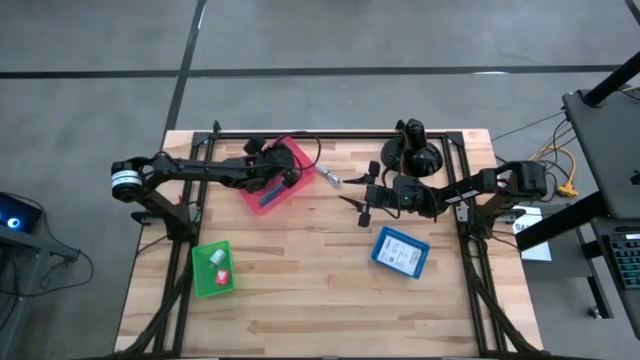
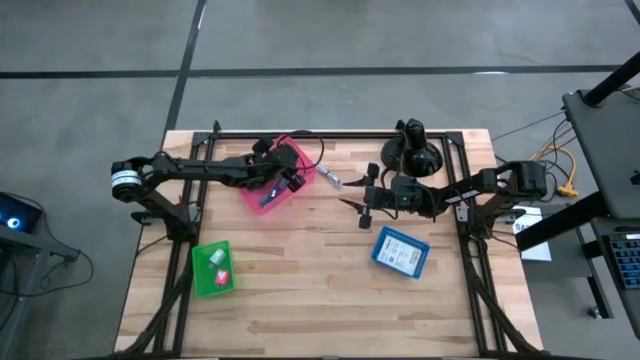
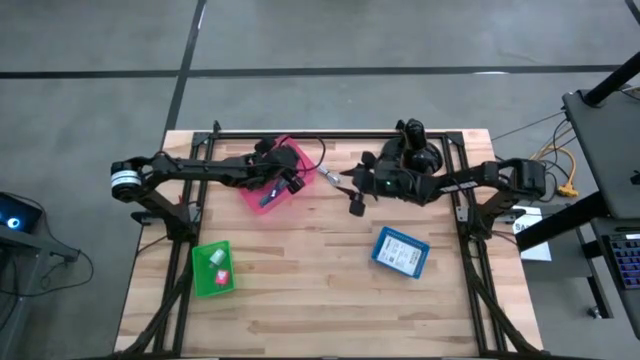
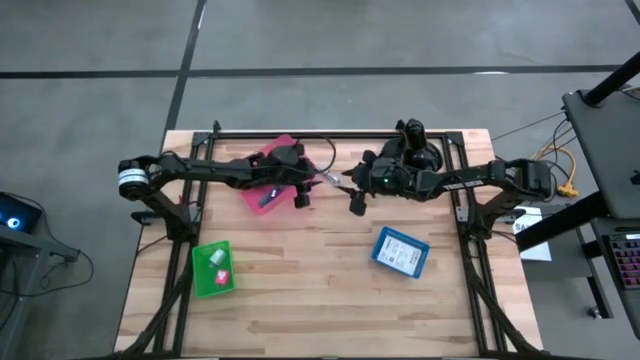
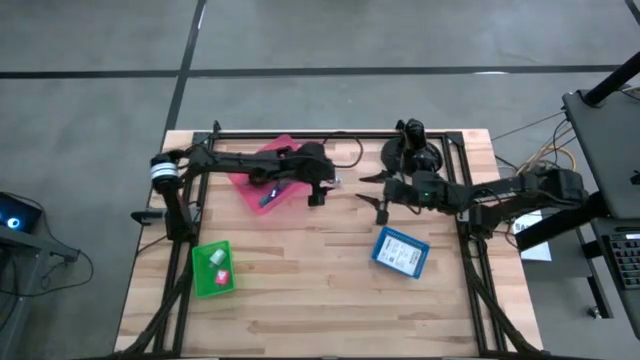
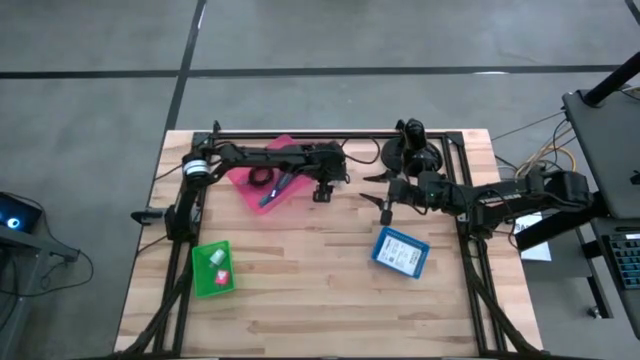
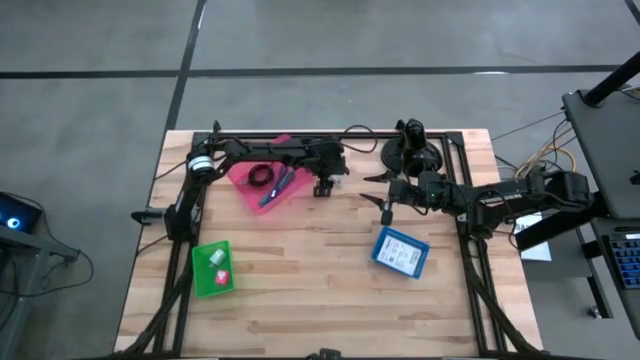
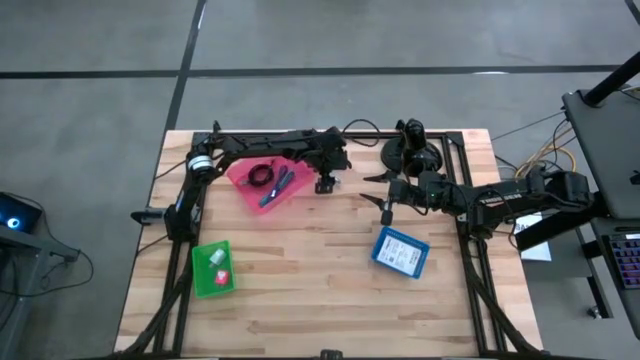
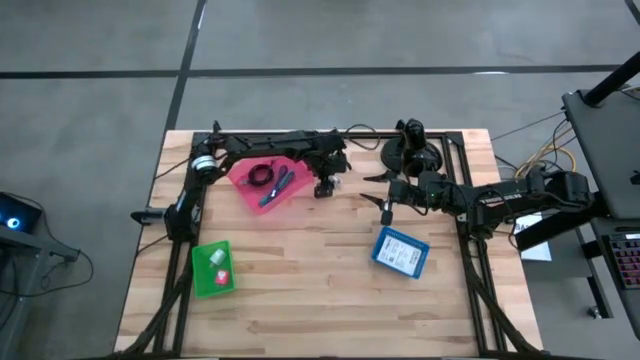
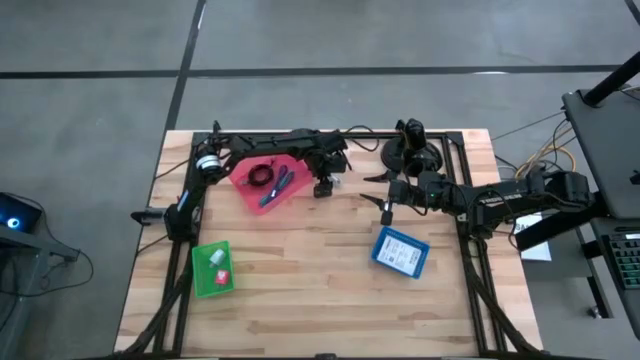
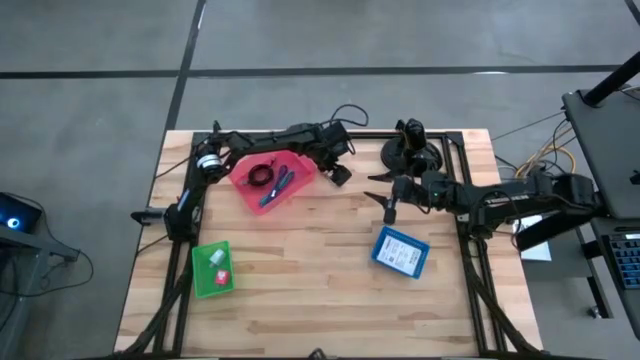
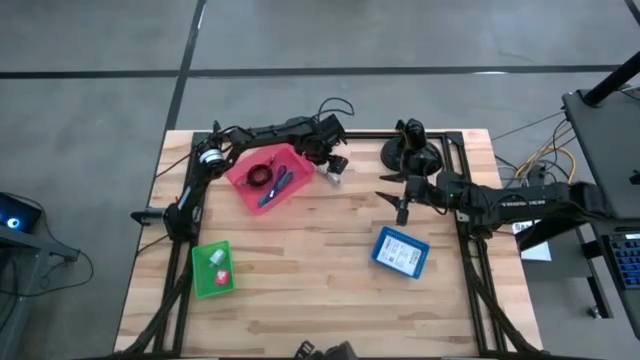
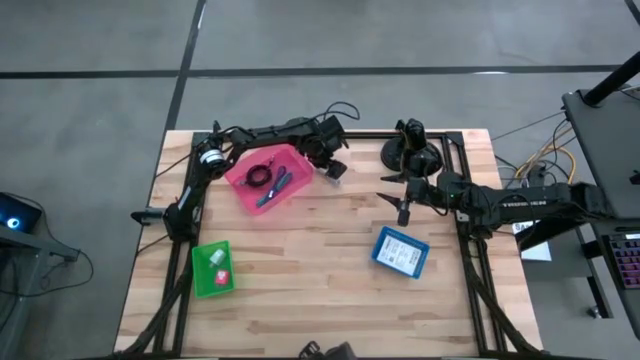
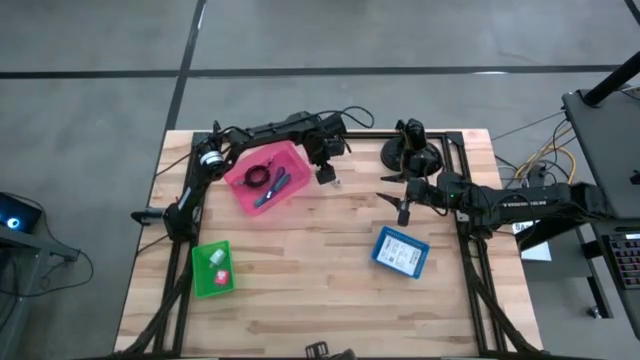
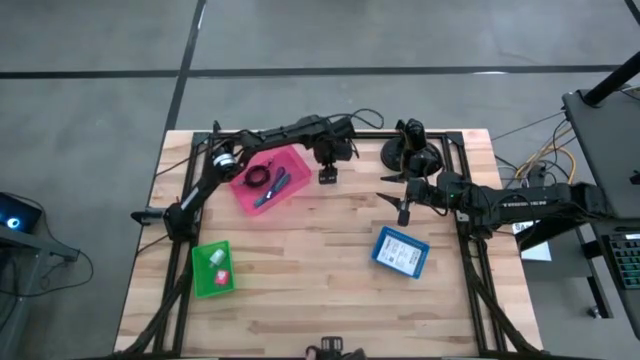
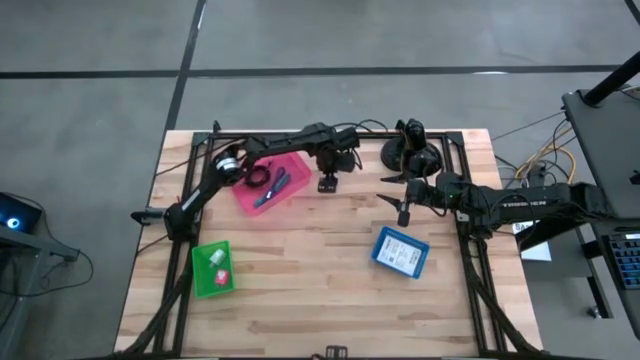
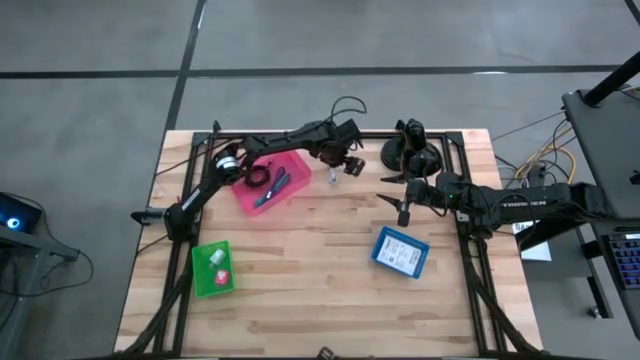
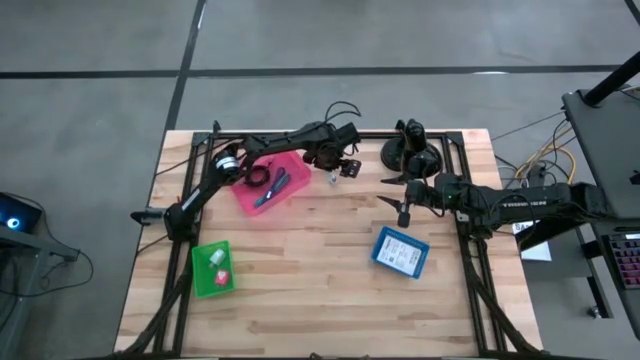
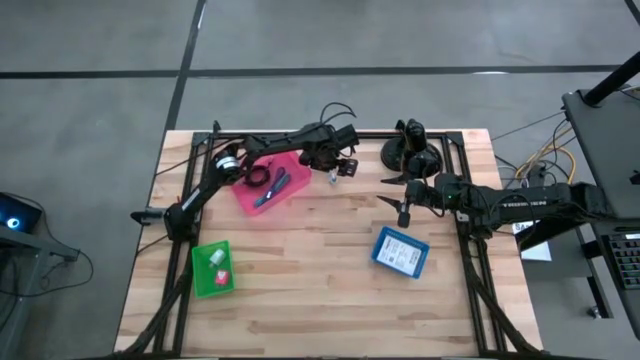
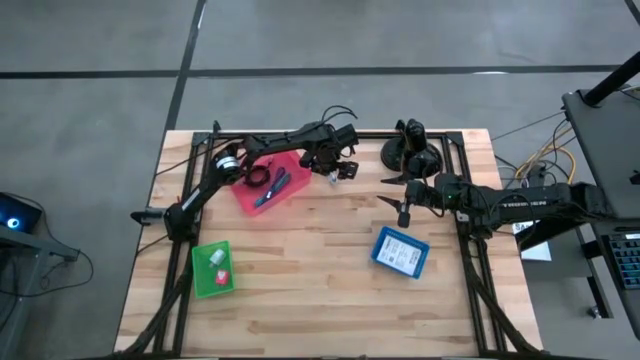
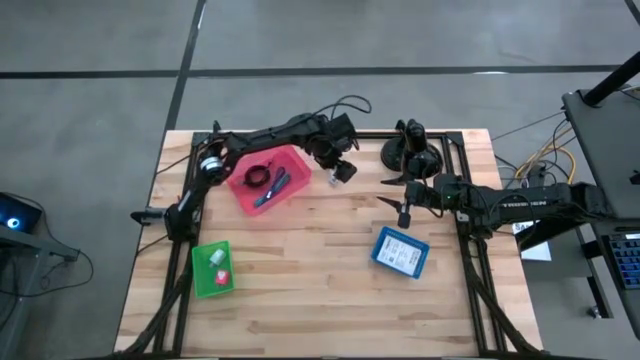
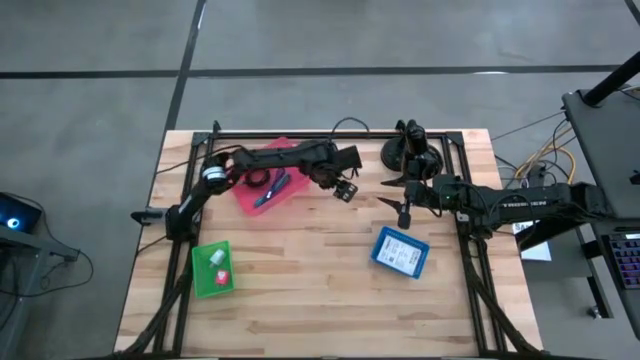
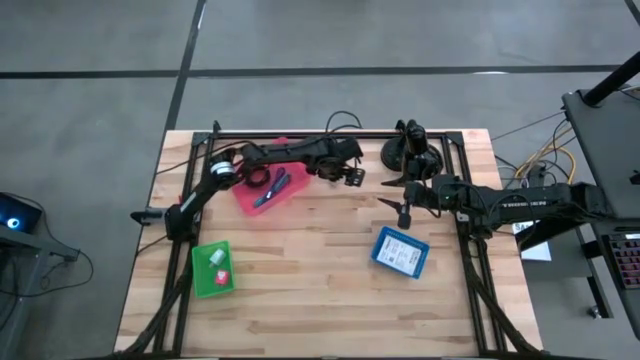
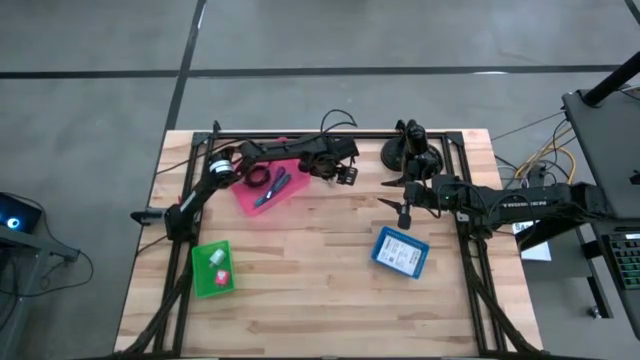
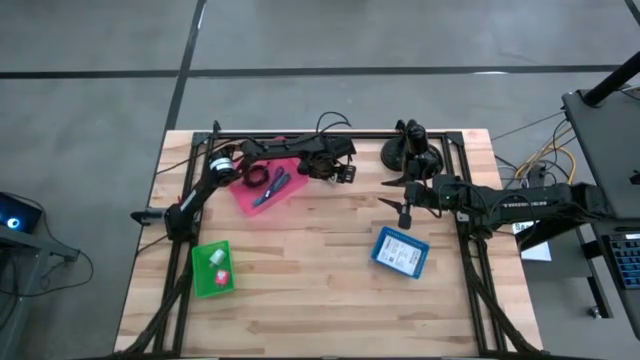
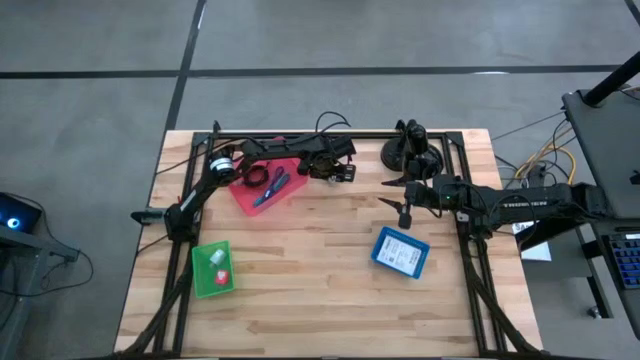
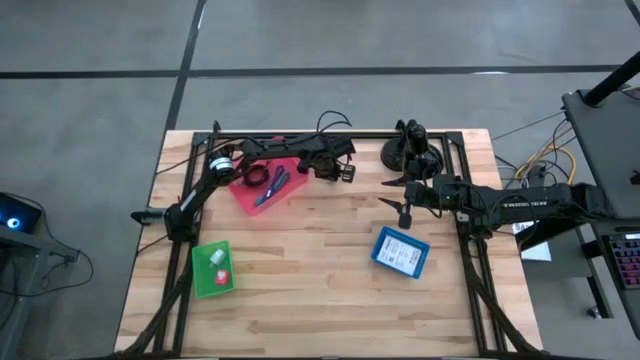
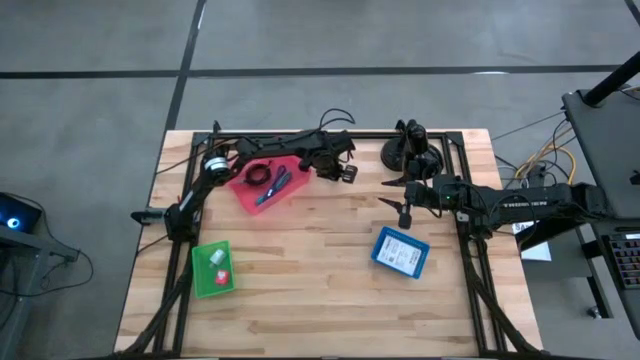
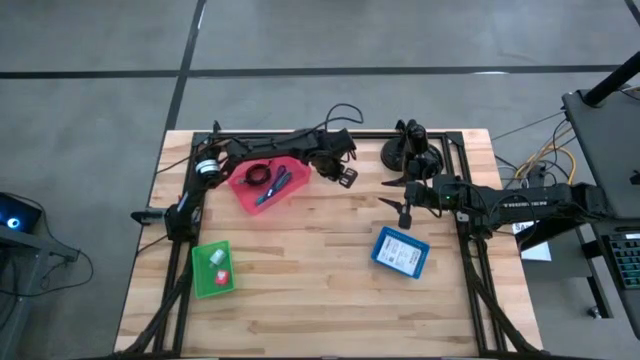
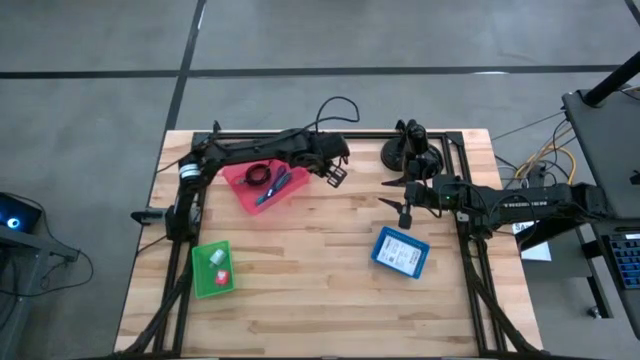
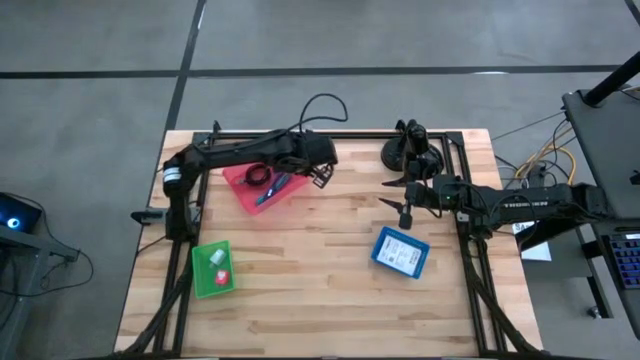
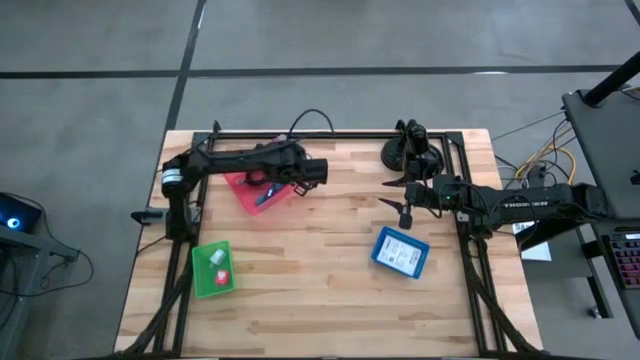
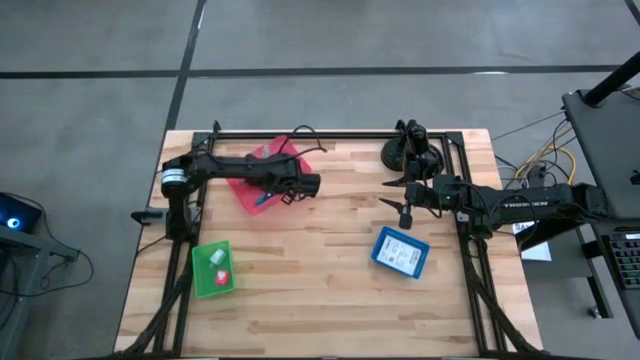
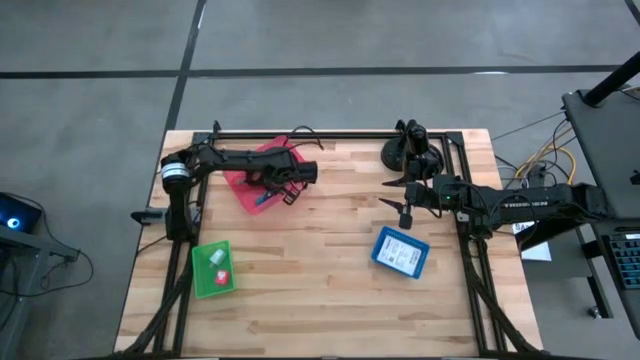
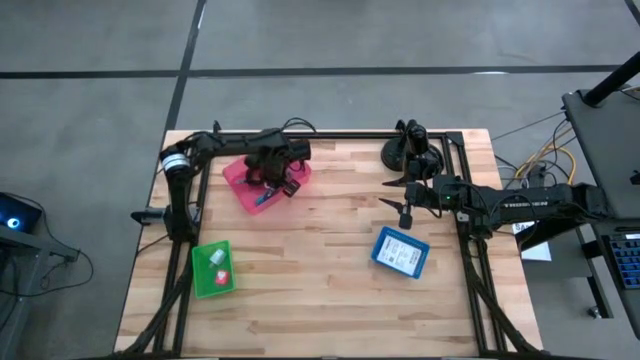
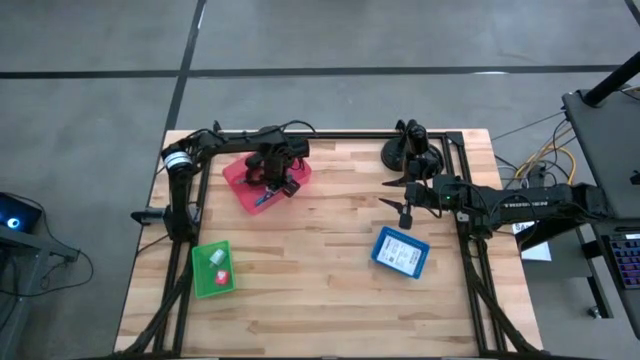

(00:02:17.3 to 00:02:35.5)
Task: Pick and place items into bin
Put the white charger cable into the red bin
